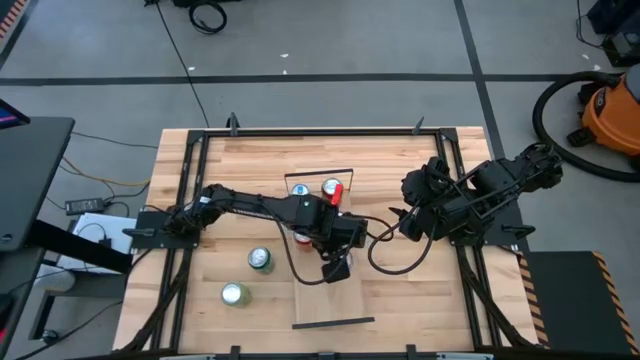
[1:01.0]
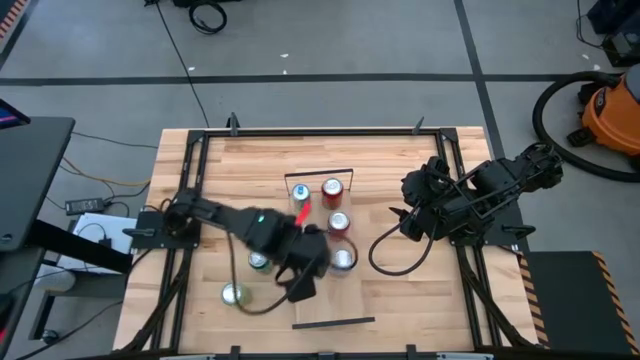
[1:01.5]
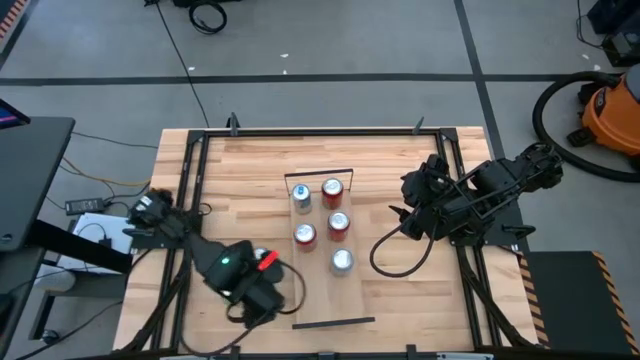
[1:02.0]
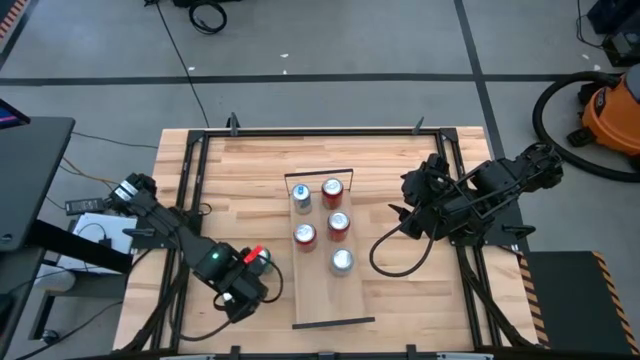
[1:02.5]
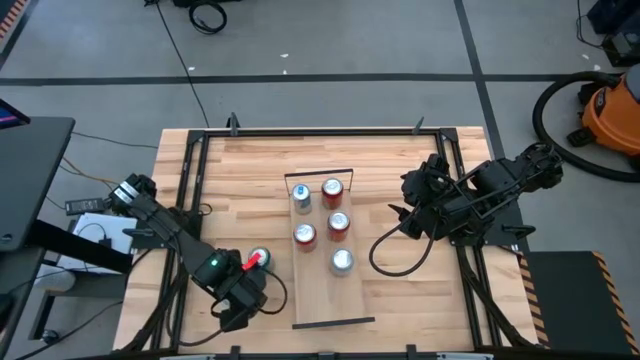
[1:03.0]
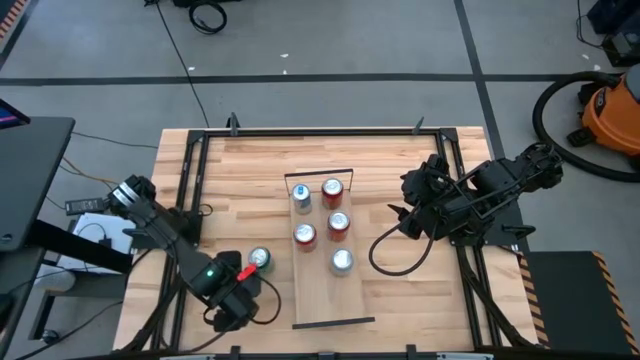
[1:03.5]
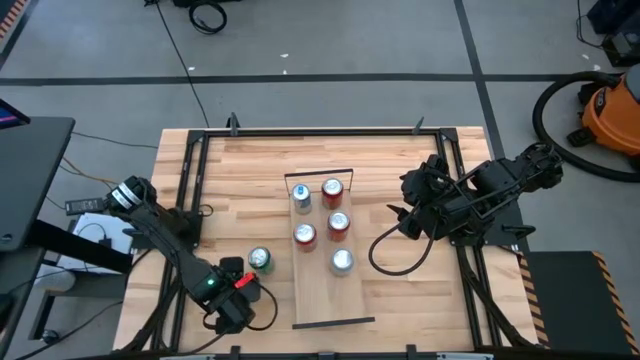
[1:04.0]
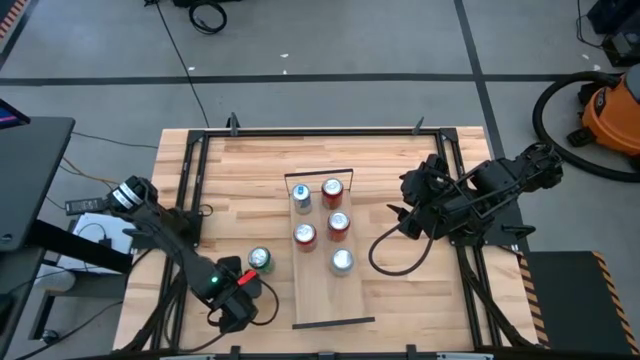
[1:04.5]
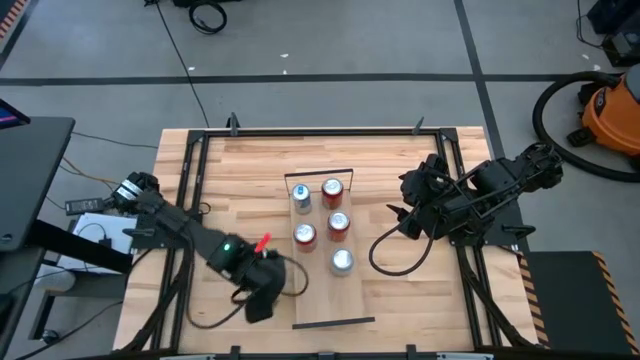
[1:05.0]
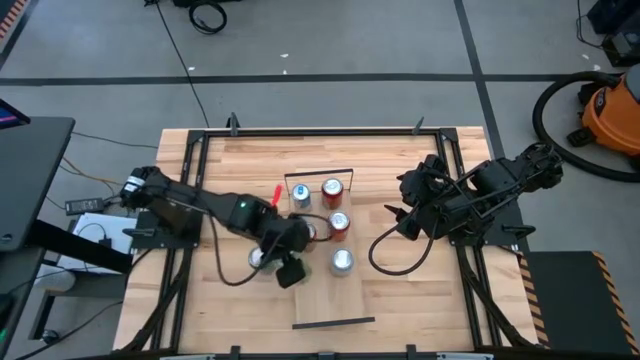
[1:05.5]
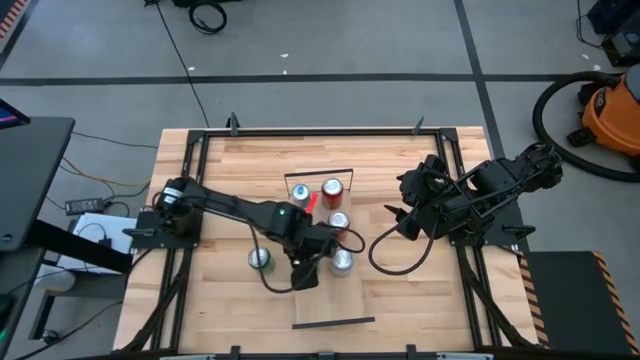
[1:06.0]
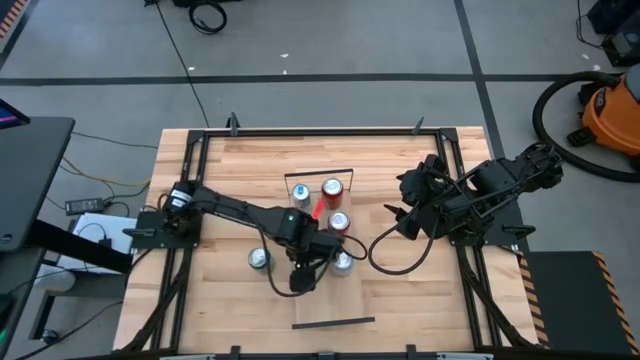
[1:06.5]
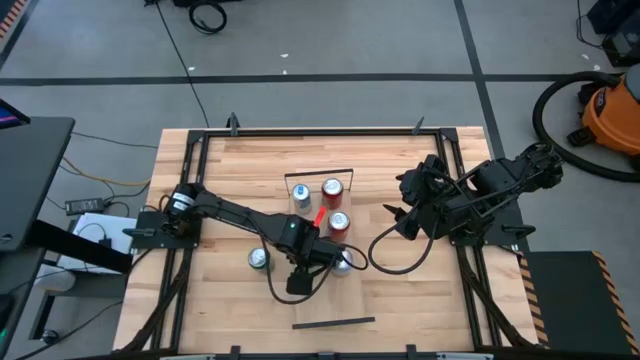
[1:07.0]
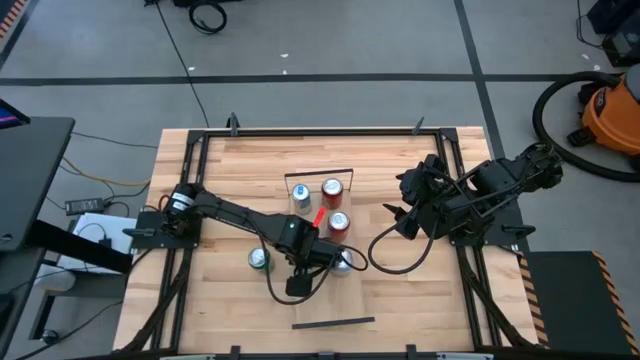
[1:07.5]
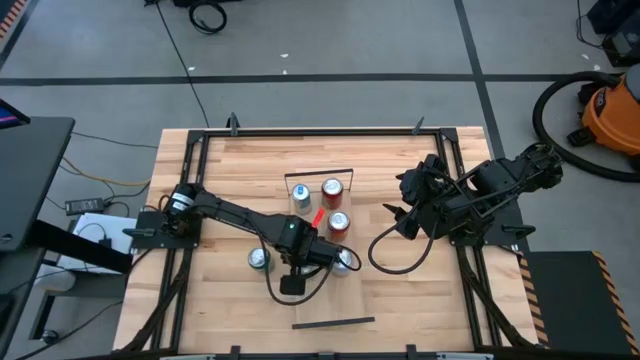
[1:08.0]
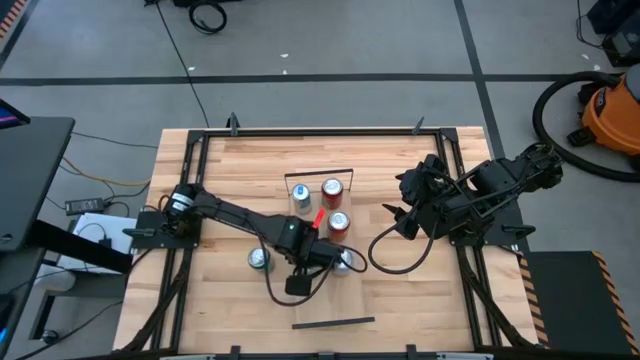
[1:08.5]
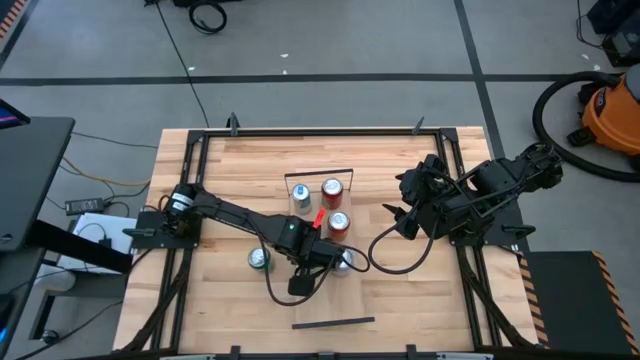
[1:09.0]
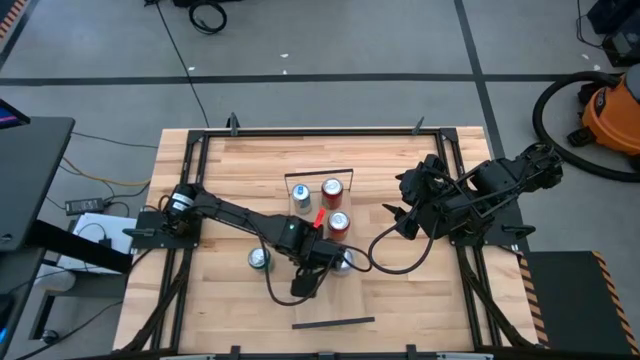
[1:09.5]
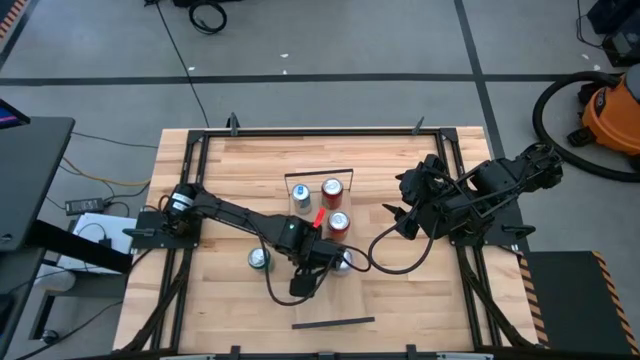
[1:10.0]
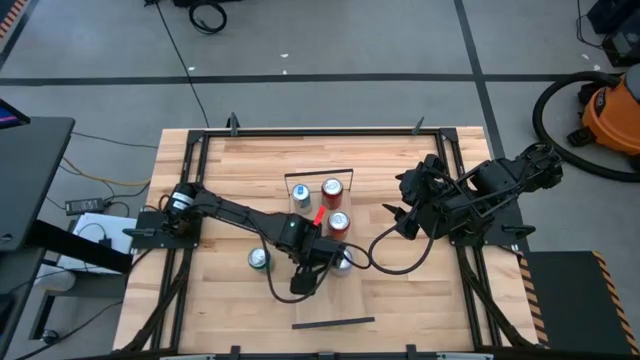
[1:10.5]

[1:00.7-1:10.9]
Task: Place canned beverage on shelf
Put the light green soda can on the shelf

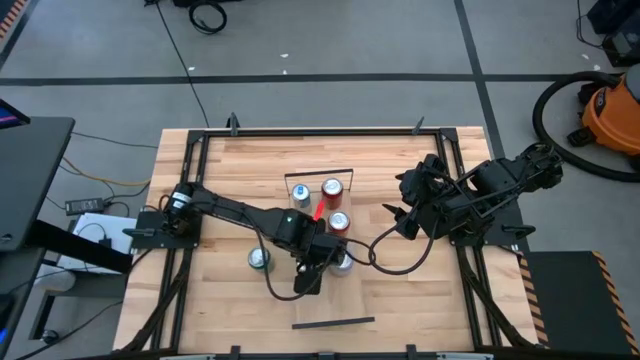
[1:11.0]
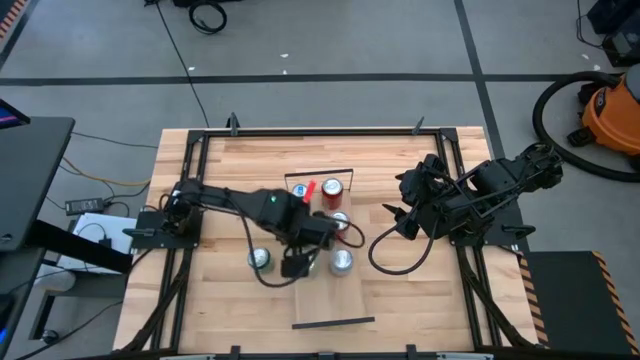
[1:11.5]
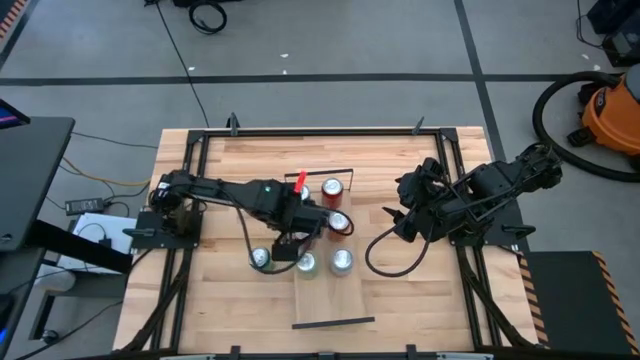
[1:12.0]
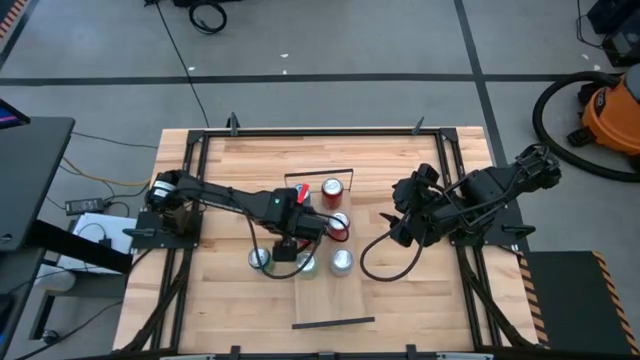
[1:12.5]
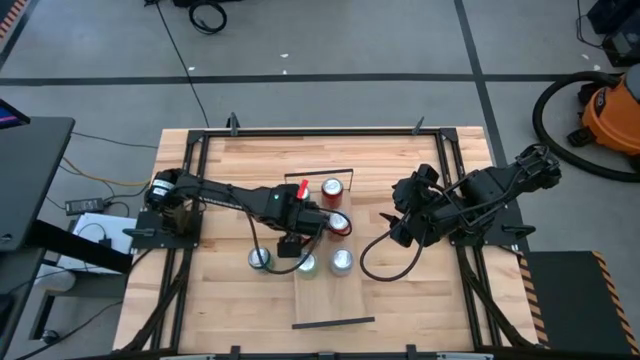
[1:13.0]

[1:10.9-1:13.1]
Adjust the left red soda can on the shelf

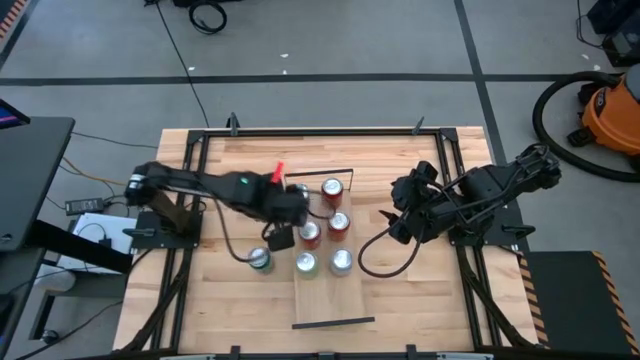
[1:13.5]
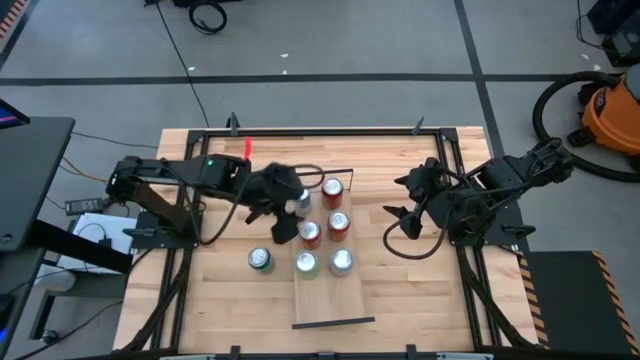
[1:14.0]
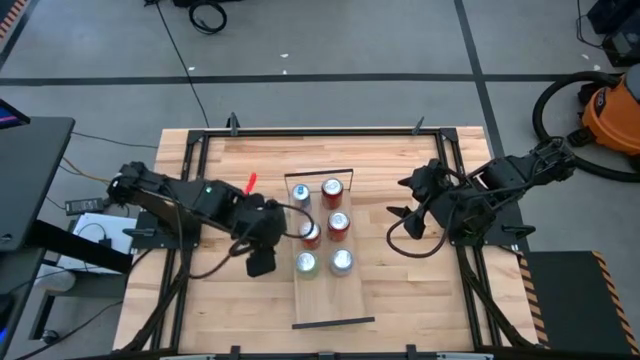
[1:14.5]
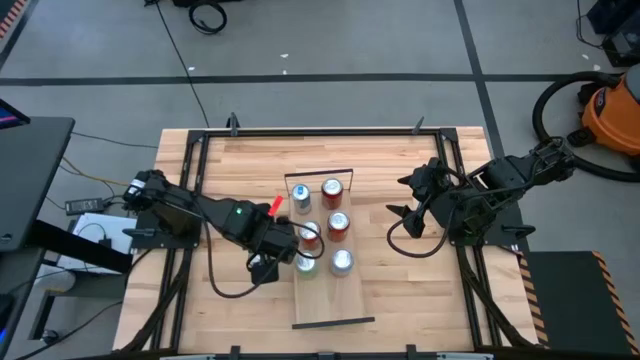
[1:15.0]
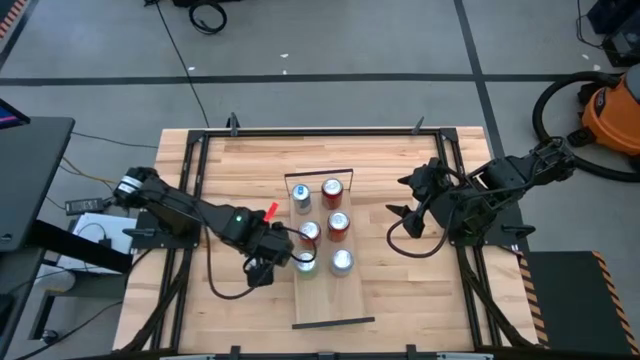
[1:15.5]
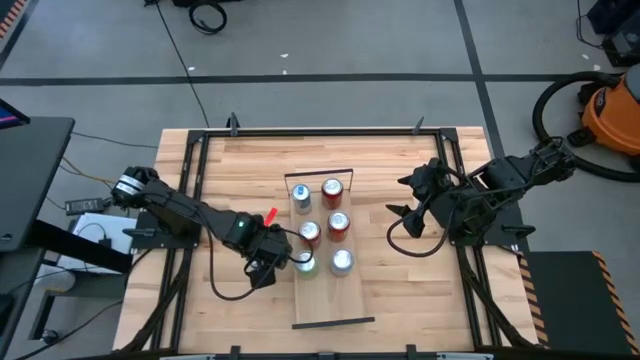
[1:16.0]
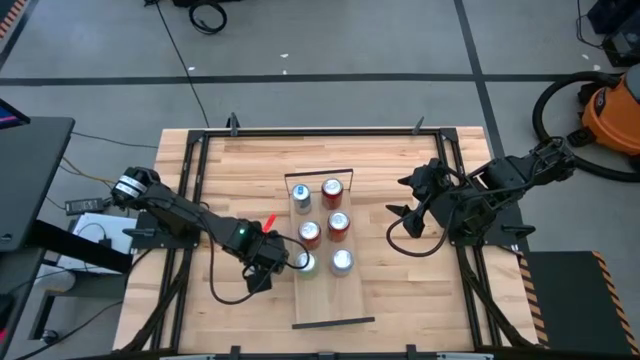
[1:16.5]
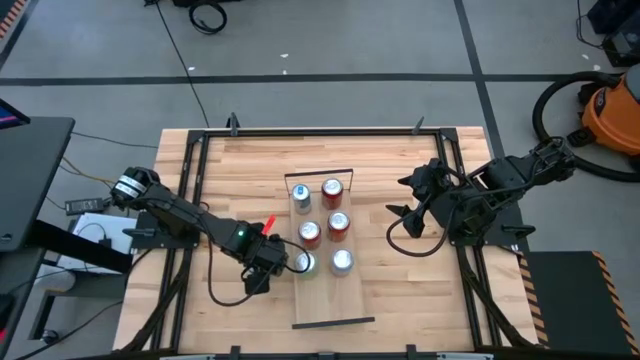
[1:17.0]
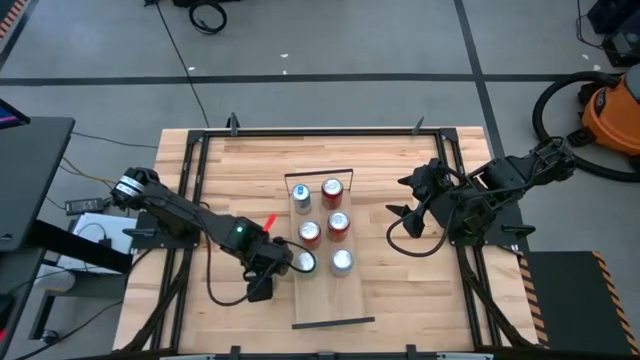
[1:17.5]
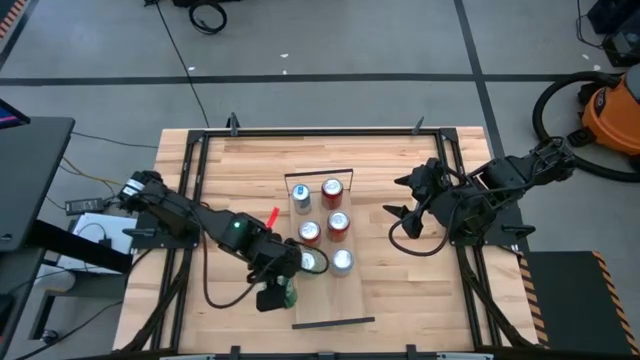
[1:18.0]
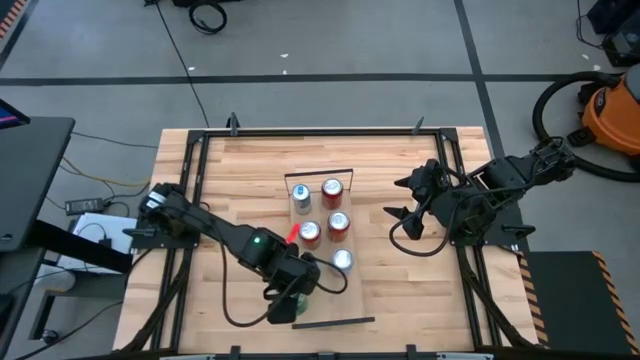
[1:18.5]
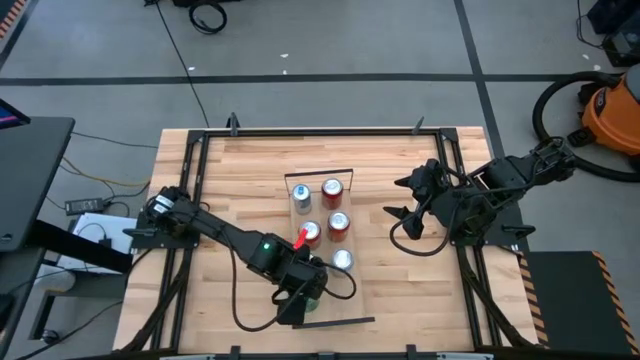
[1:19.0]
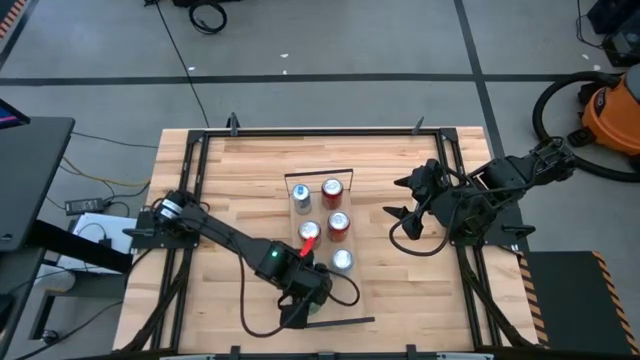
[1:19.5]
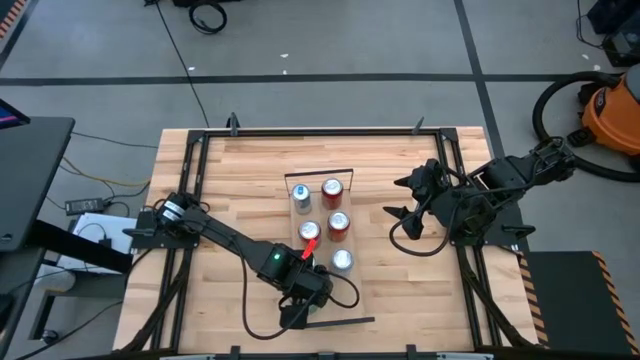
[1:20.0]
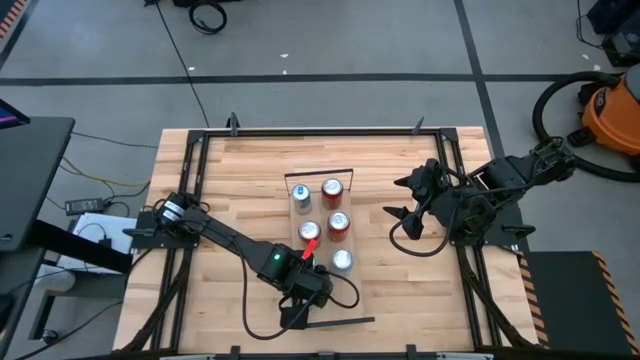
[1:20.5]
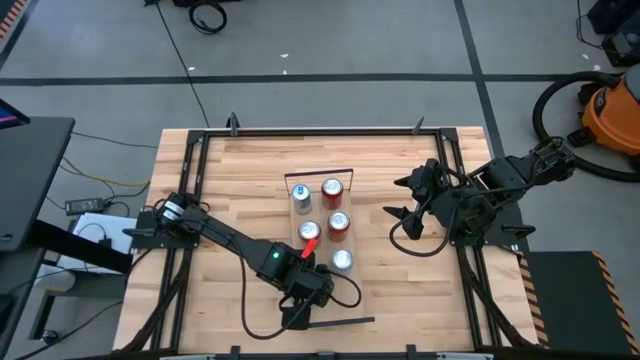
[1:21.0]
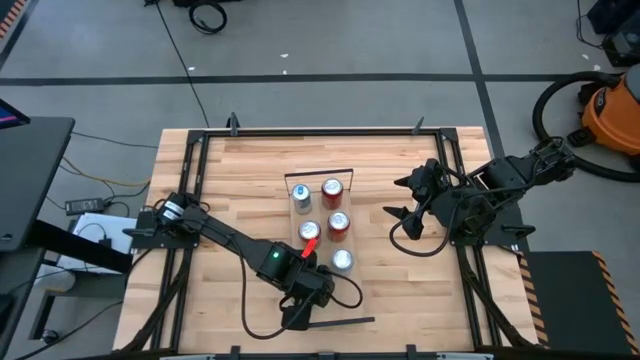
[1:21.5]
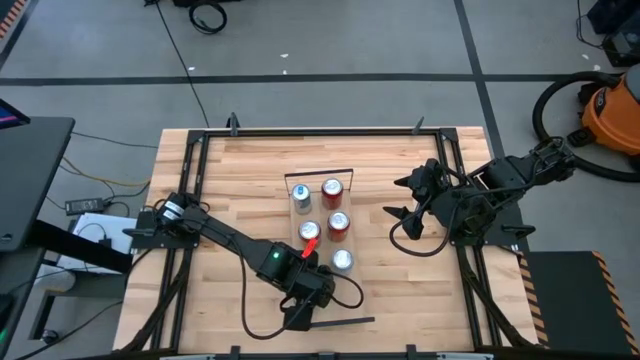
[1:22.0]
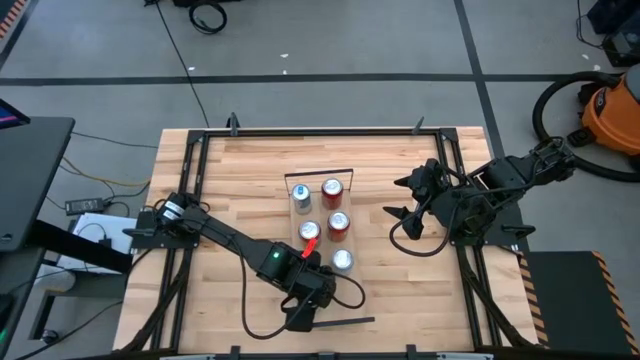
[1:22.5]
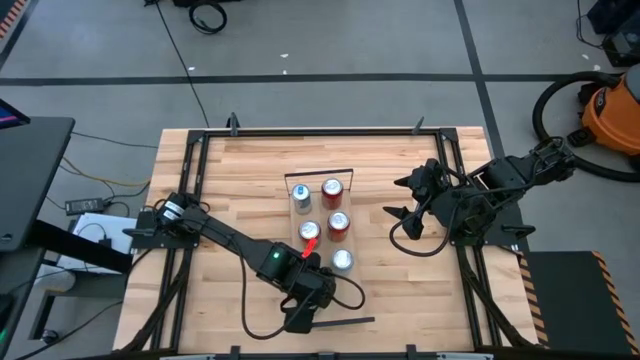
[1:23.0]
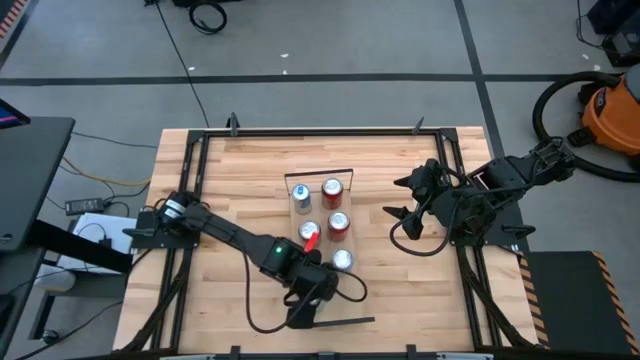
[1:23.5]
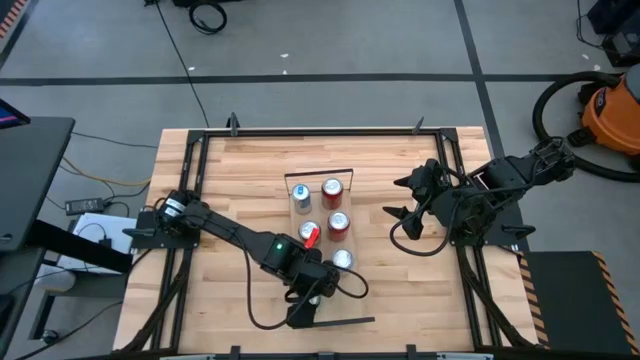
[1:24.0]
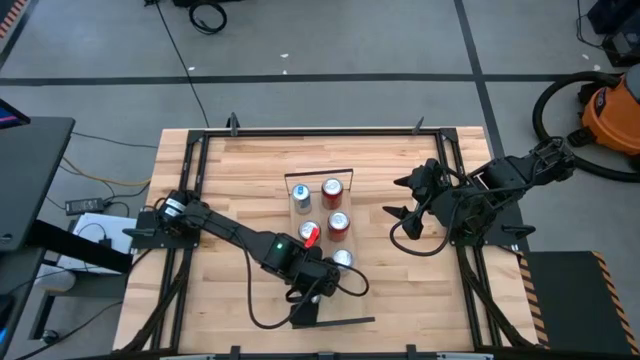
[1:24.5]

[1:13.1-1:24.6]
Put the green soda can on the shelf
